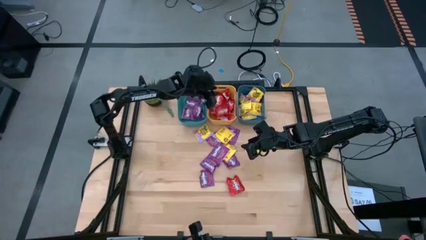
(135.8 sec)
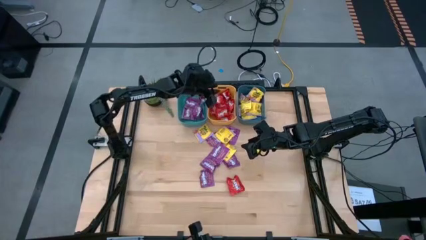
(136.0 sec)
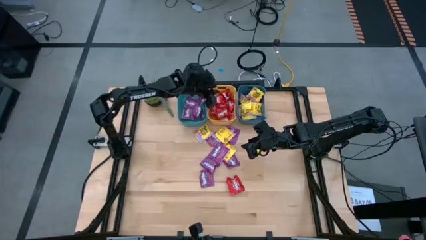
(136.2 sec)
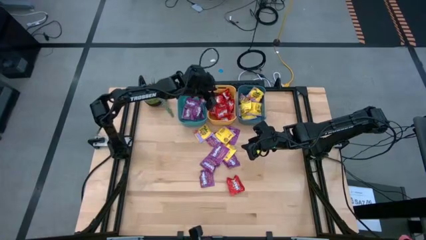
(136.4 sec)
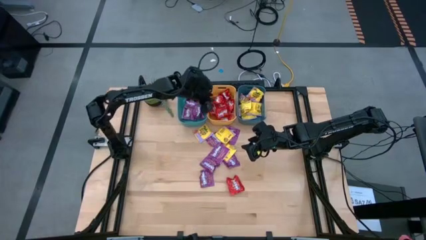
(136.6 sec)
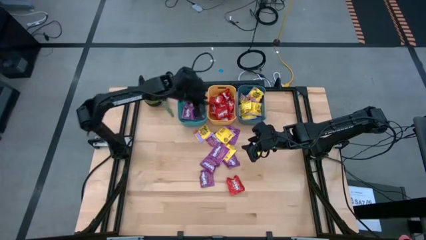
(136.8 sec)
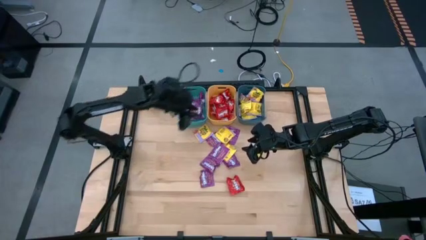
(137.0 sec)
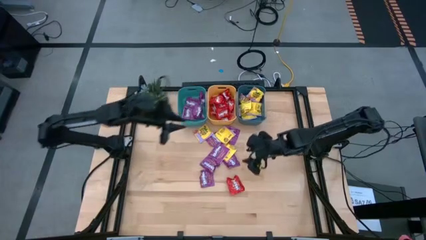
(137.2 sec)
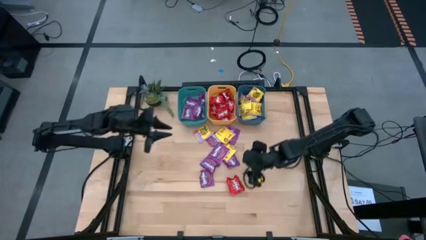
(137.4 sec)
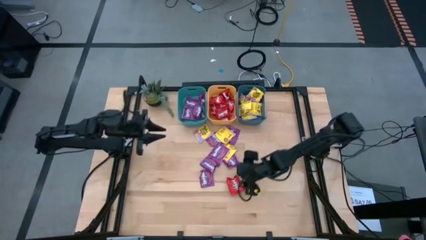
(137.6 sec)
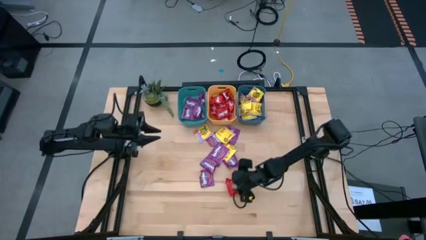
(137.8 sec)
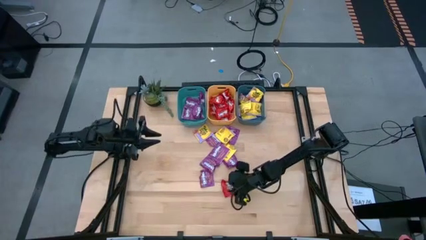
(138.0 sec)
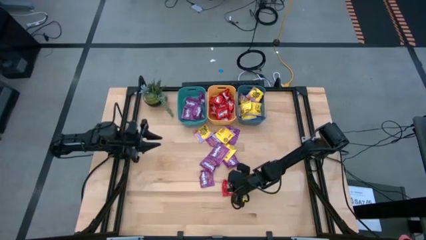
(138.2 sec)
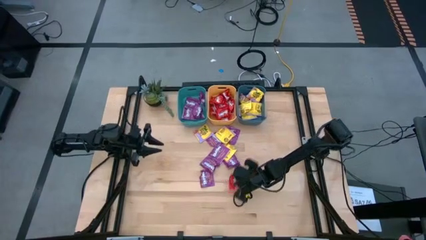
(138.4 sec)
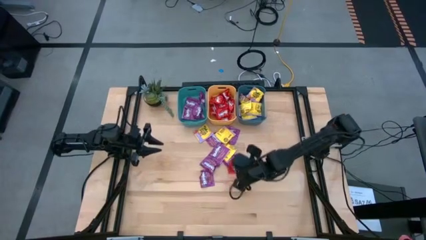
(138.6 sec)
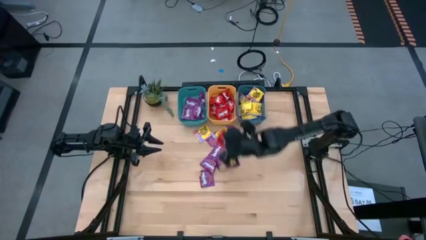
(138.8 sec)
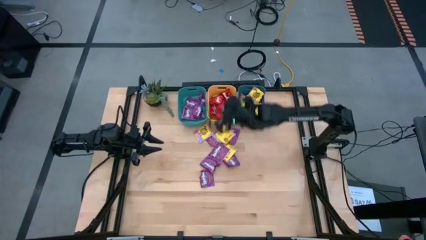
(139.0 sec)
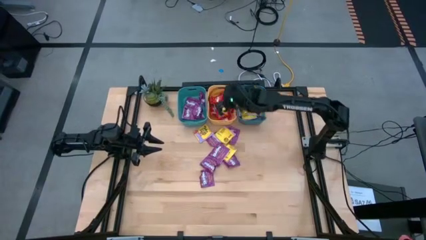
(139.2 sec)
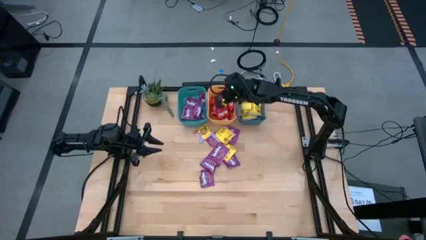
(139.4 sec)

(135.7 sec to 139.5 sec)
Task: Sort candy
Put the red candy into the yellow bin

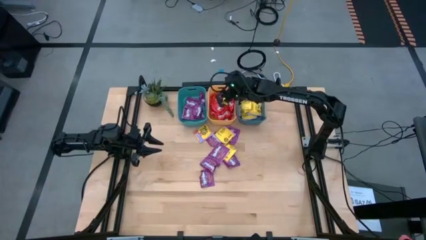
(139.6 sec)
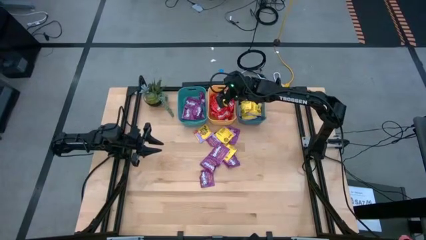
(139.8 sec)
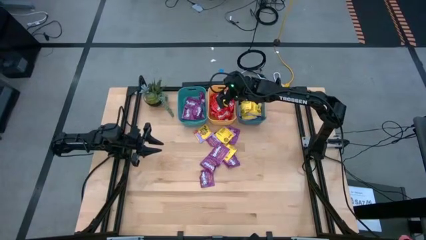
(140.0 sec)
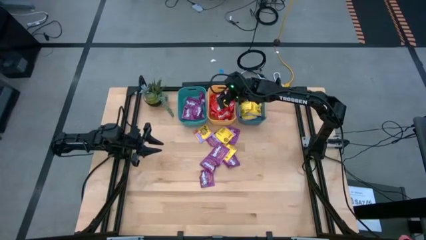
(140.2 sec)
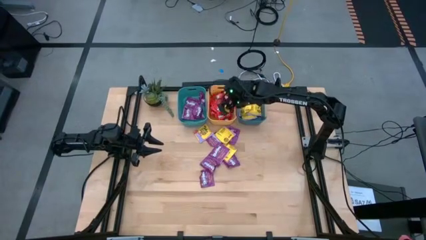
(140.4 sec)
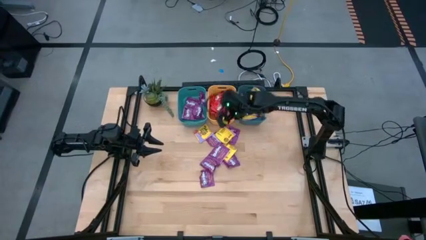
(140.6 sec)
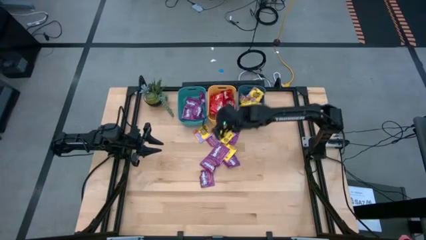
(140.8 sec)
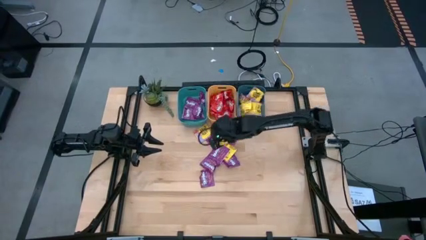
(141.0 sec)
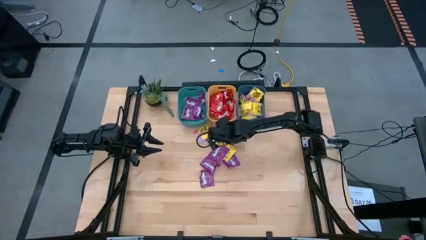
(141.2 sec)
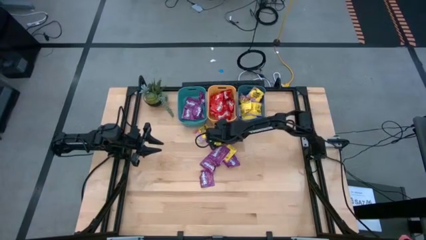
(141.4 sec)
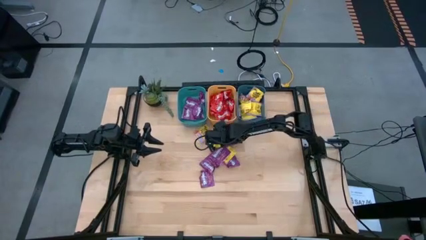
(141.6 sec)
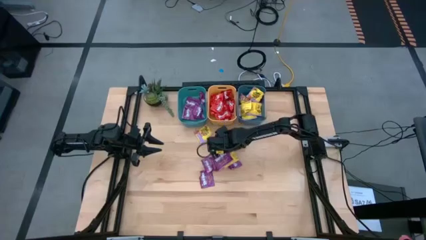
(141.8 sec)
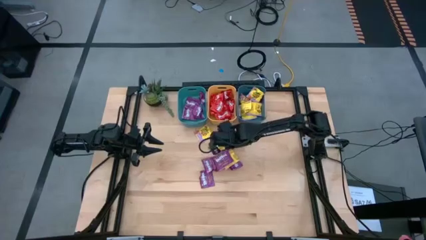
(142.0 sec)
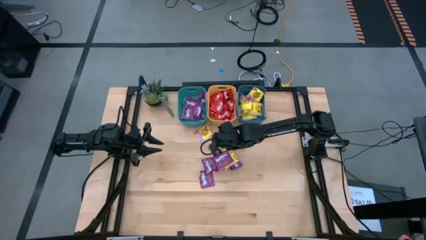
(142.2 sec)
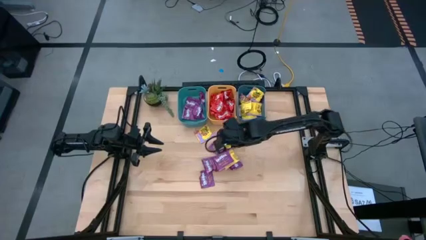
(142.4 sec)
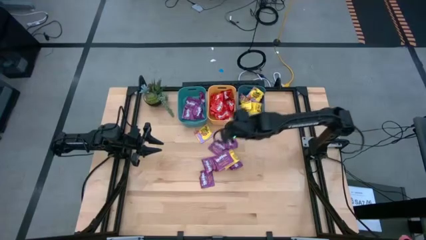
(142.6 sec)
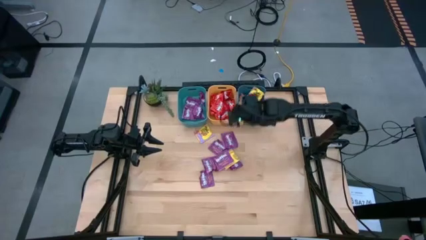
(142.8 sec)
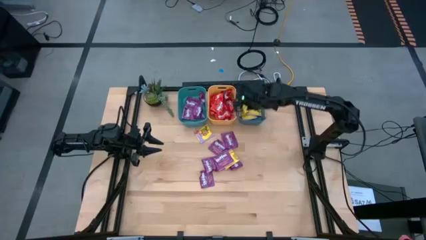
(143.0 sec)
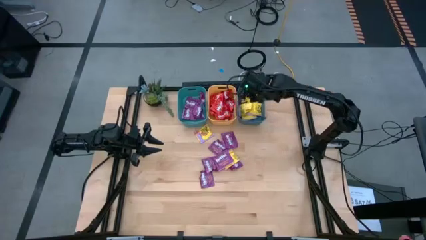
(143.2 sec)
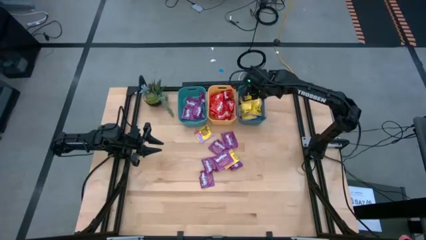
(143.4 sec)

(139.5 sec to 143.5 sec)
Put the yellow candy into the dark blue bin

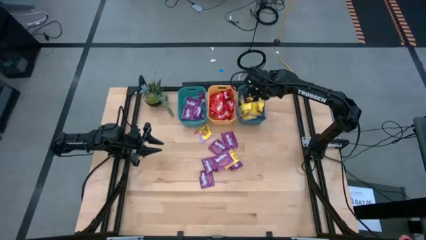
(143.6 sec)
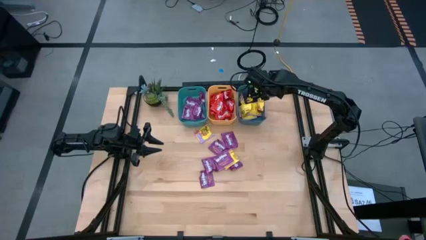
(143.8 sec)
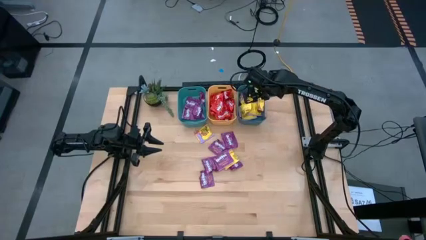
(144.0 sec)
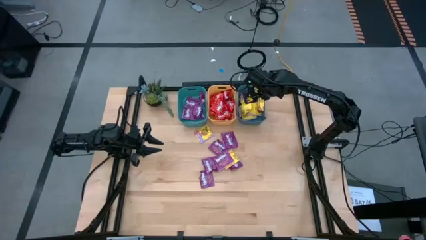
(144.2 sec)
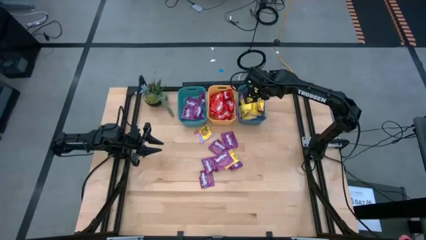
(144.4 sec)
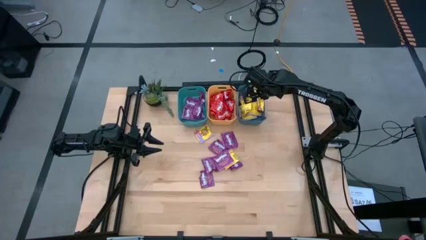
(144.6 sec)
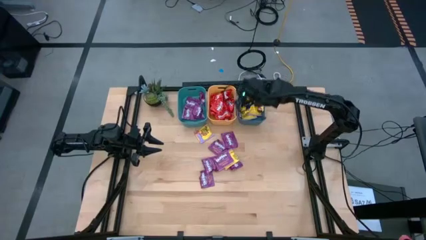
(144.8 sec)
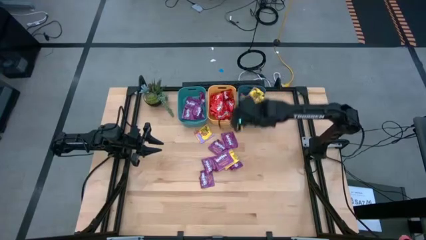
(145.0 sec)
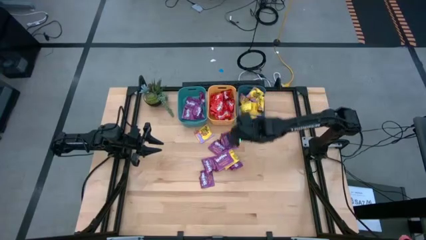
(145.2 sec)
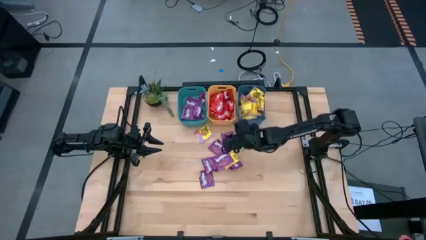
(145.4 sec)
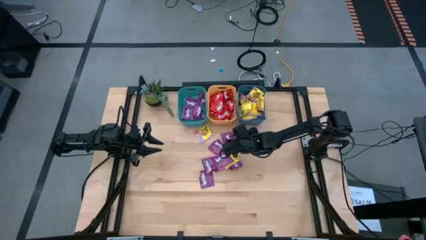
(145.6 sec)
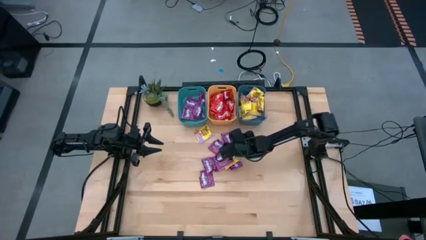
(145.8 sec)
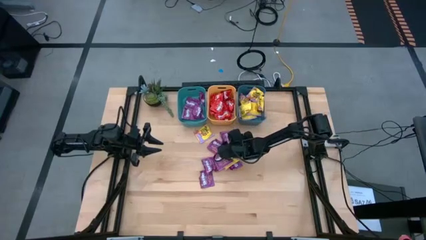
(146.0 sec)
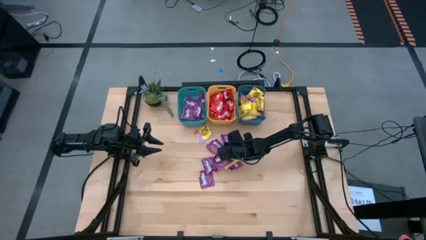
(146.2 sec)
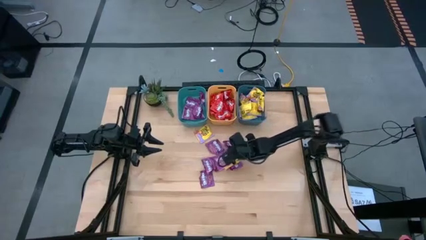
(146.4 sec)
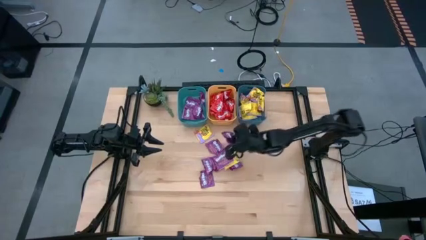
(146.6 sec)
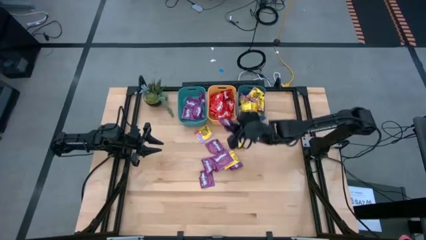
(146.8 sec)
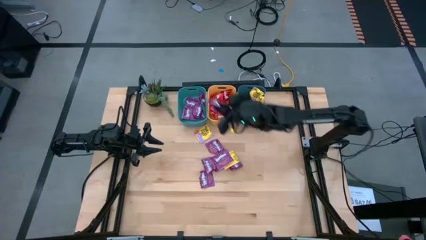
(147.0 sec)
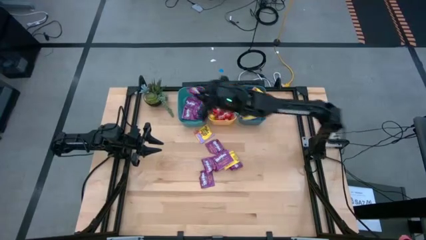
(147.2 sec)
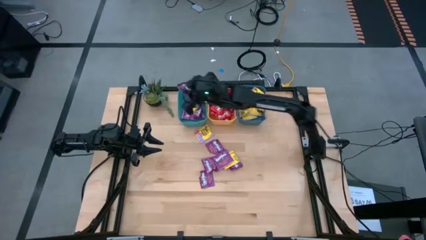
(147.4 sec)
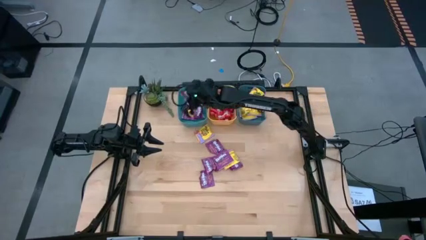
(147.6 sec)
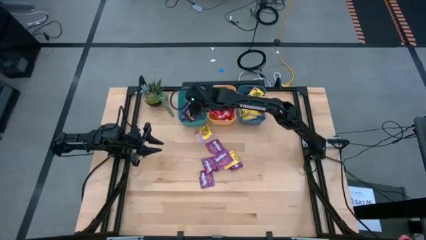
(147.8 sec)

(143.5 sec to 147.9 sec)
Put the violet candy into the blue bin

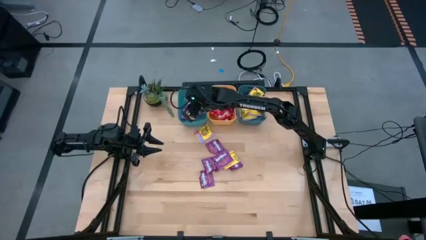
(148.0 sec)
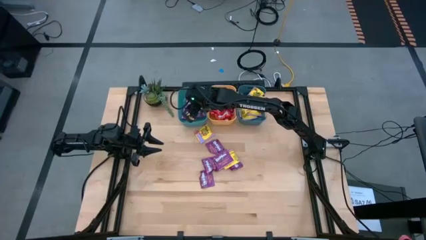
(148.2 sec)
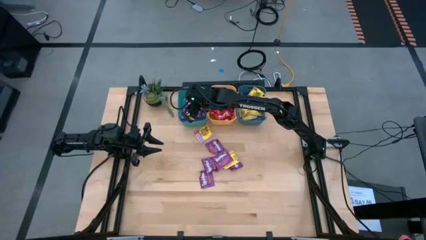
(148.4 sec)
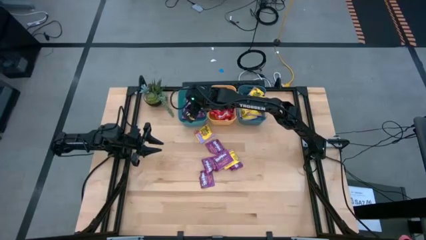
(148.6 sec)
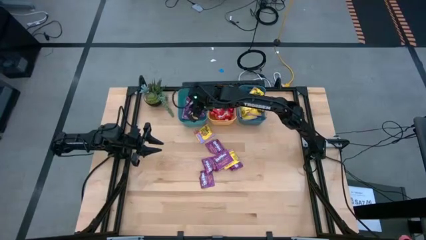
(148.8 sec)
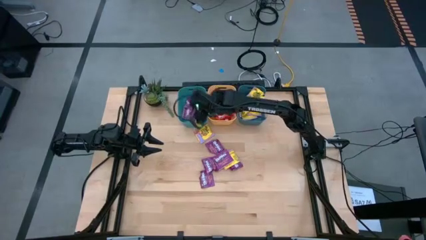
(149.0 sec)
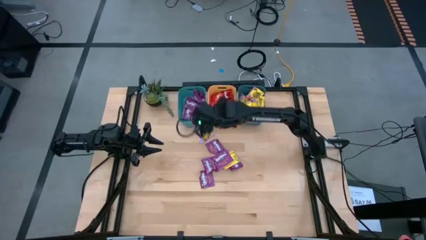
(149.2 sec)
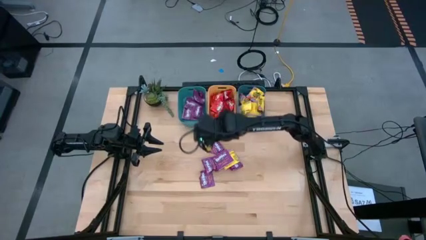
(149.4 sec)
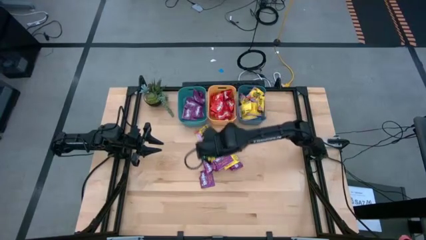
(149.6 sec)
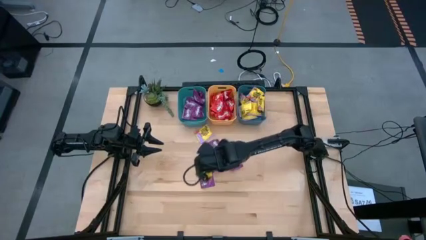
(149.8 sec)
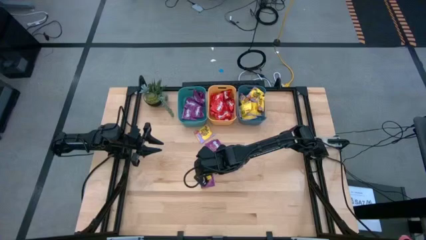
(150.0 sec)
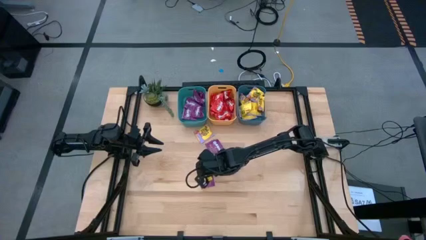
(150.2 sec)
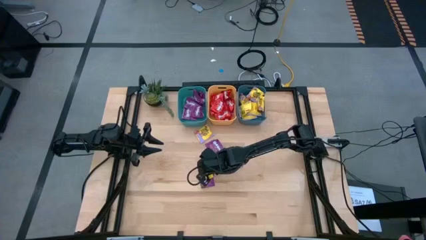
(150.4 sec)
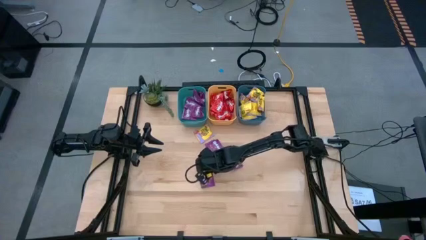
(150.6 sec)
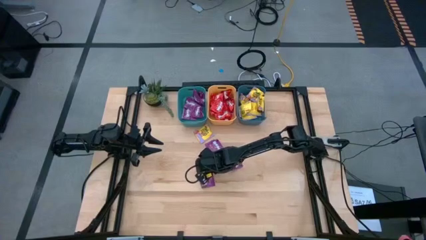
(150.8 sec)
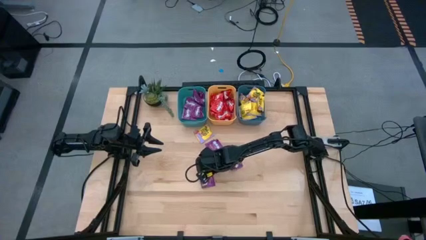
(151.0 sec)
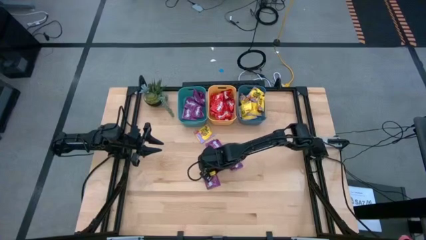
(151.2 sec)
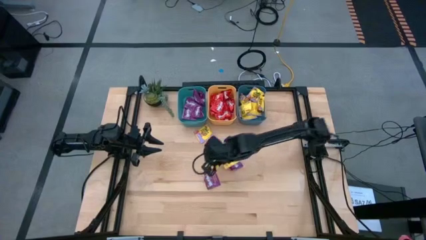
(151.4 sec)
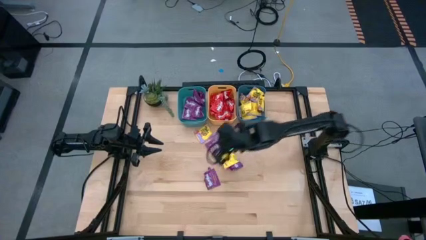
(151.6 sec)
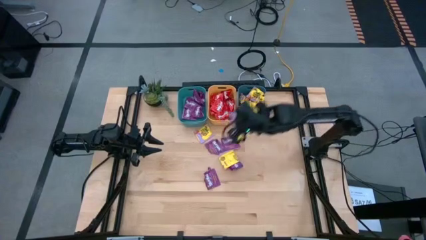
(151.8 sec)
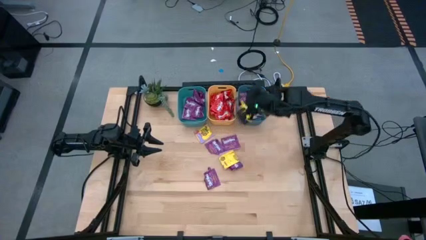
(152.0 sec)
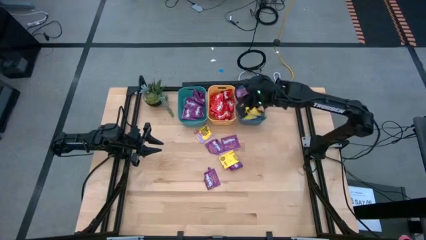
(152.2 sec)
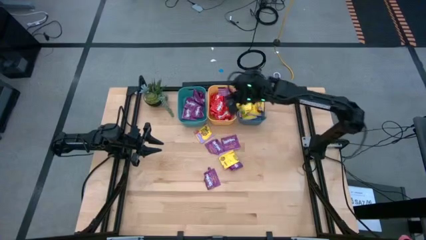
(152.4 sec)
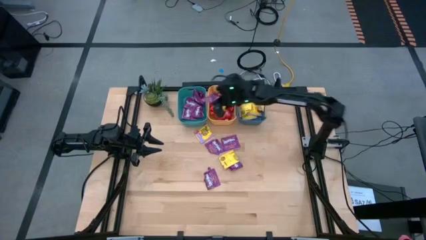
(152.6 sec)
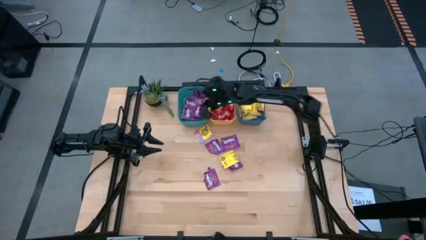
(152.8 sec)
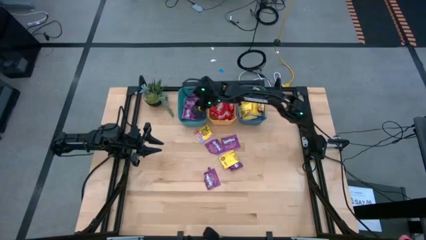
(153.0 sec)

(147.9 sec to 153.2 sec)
Put the violet candy into the blue bin
